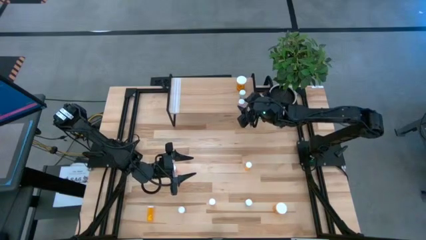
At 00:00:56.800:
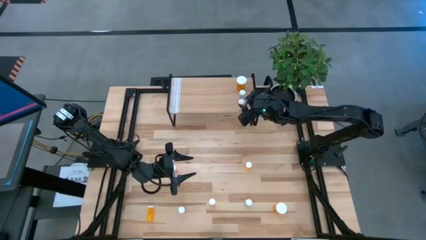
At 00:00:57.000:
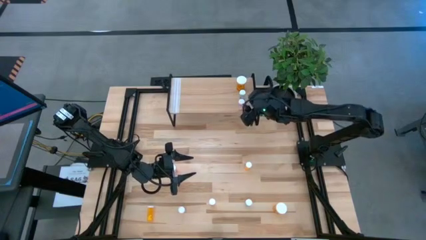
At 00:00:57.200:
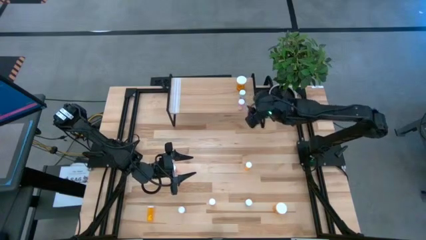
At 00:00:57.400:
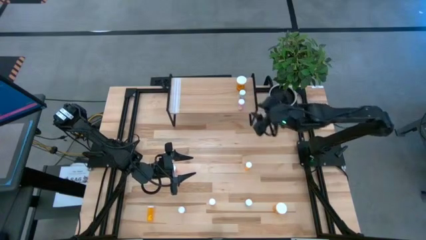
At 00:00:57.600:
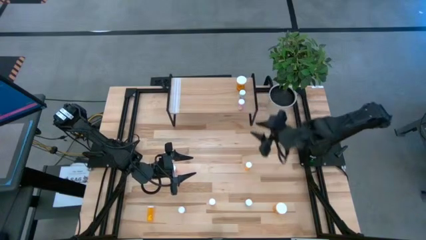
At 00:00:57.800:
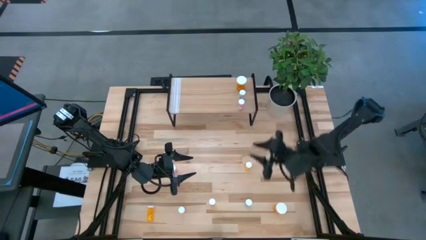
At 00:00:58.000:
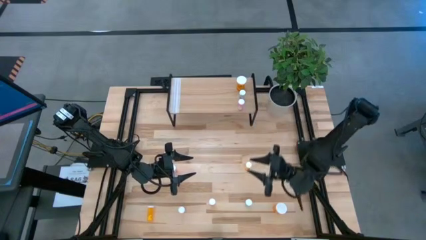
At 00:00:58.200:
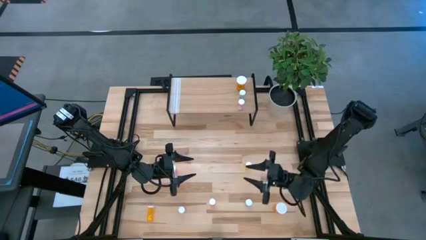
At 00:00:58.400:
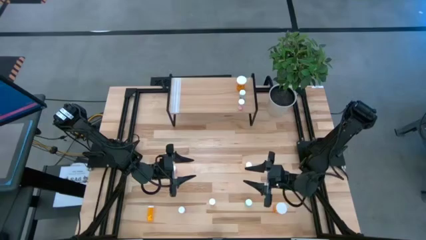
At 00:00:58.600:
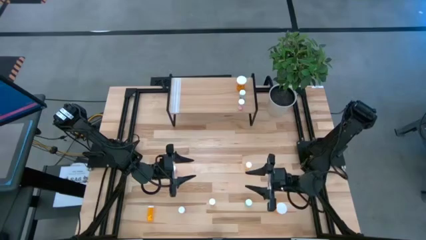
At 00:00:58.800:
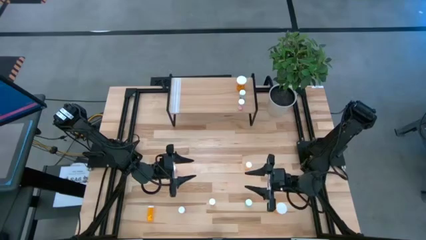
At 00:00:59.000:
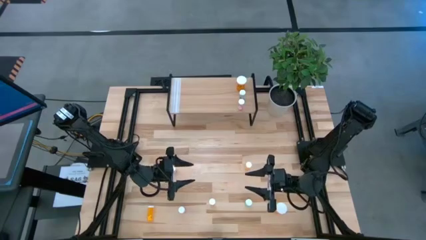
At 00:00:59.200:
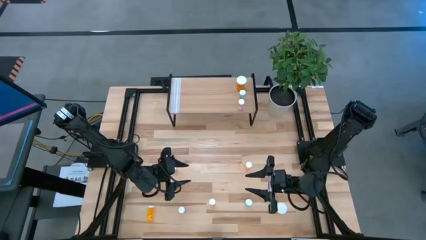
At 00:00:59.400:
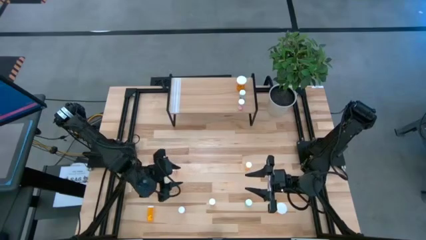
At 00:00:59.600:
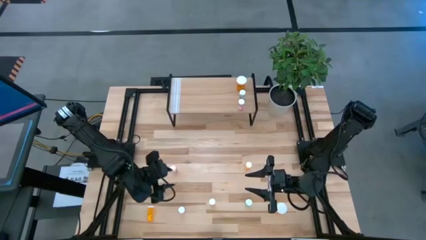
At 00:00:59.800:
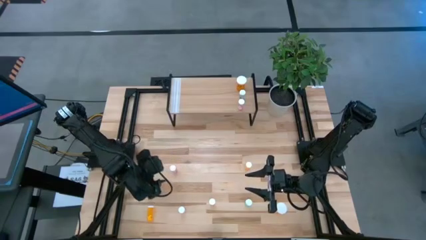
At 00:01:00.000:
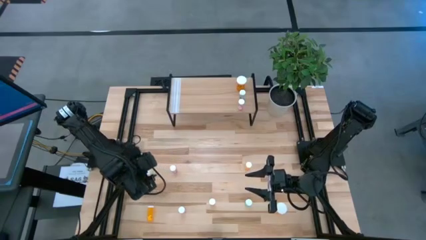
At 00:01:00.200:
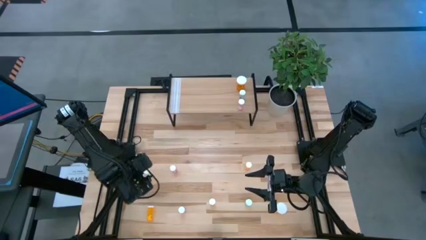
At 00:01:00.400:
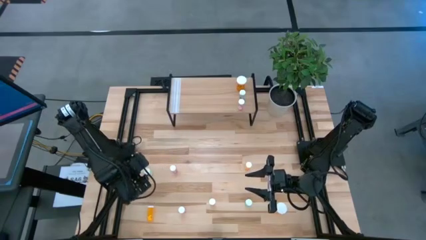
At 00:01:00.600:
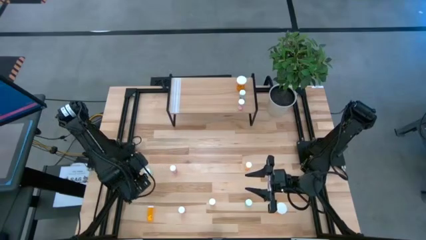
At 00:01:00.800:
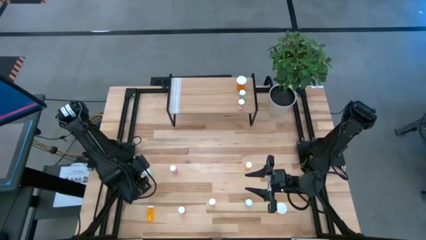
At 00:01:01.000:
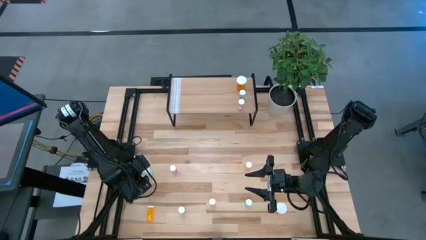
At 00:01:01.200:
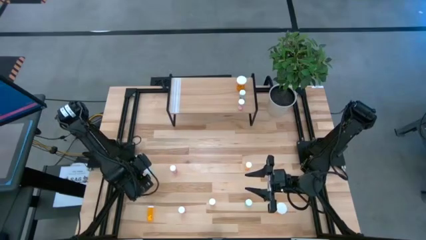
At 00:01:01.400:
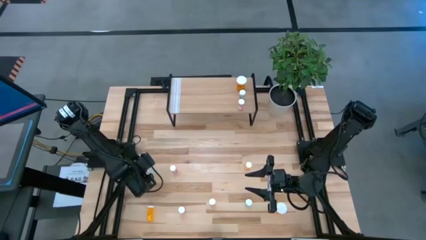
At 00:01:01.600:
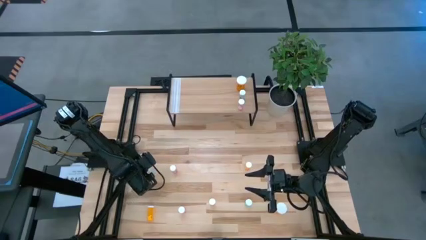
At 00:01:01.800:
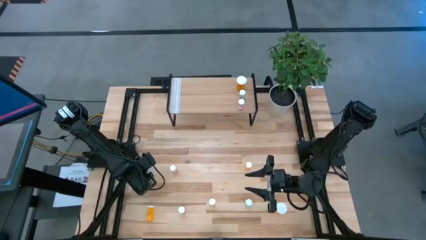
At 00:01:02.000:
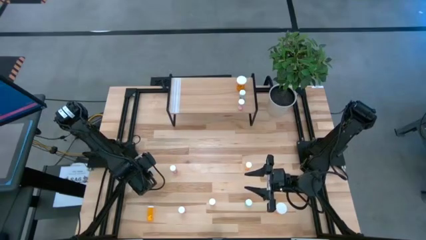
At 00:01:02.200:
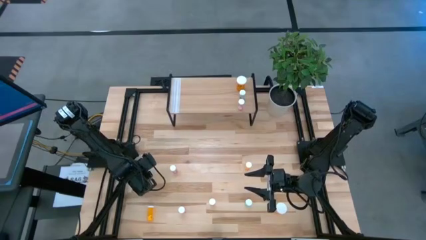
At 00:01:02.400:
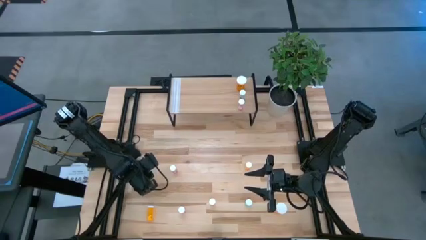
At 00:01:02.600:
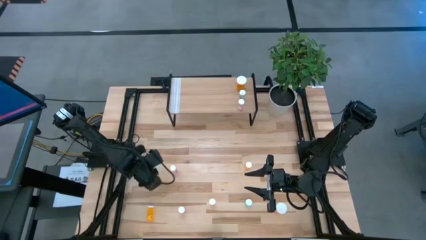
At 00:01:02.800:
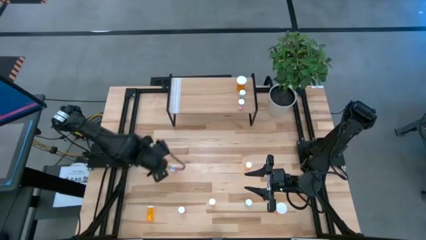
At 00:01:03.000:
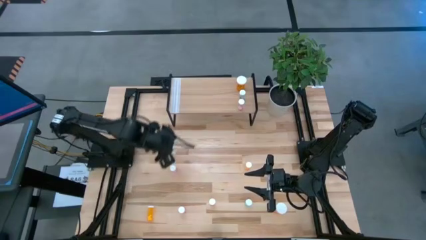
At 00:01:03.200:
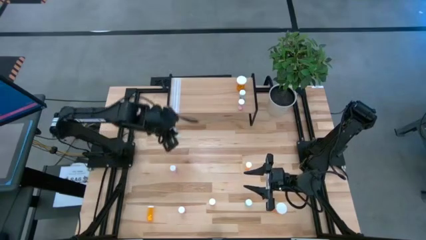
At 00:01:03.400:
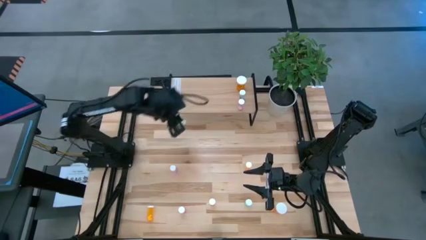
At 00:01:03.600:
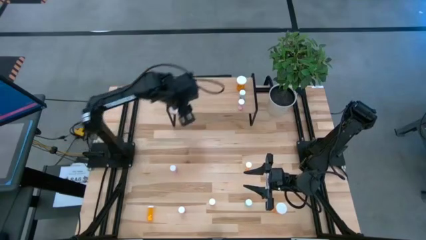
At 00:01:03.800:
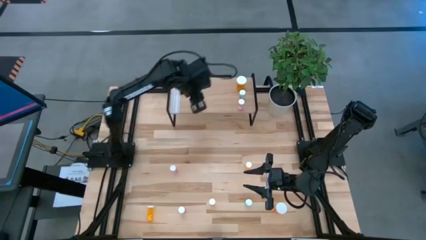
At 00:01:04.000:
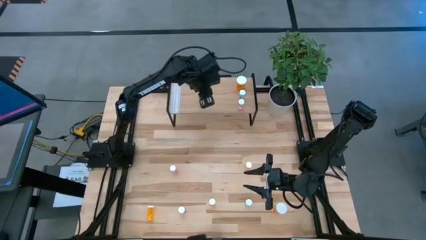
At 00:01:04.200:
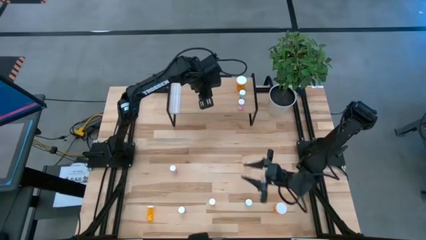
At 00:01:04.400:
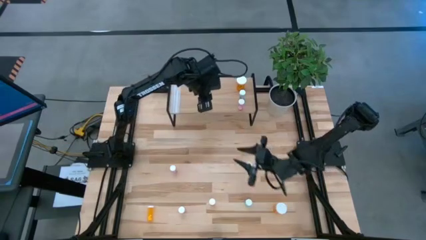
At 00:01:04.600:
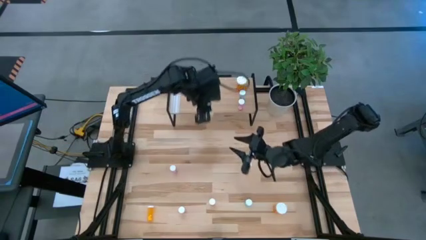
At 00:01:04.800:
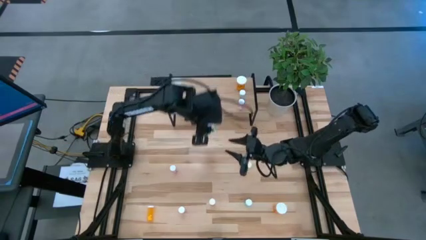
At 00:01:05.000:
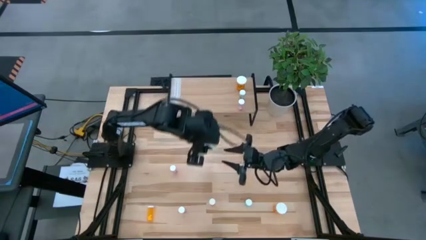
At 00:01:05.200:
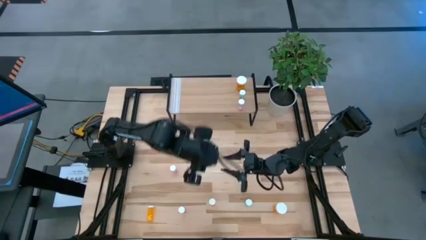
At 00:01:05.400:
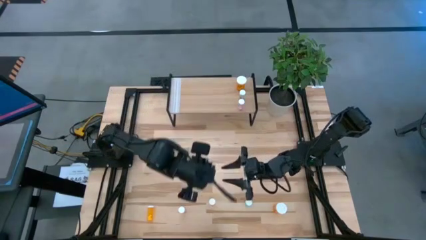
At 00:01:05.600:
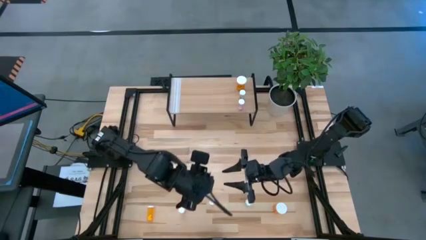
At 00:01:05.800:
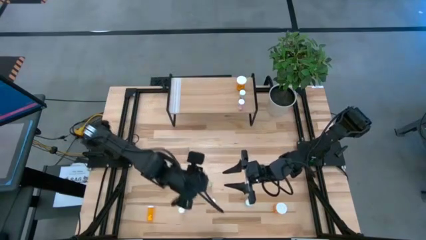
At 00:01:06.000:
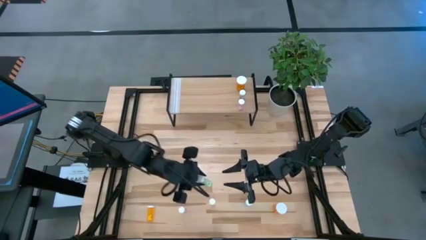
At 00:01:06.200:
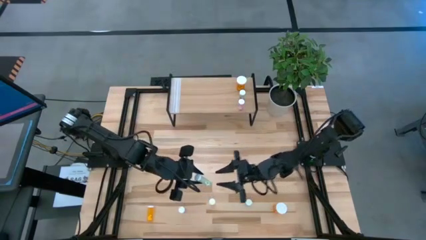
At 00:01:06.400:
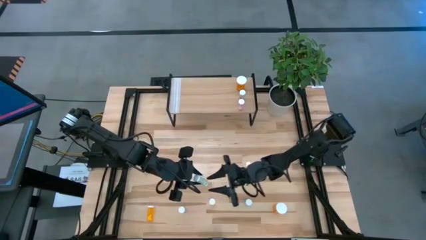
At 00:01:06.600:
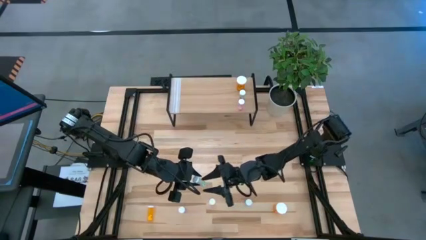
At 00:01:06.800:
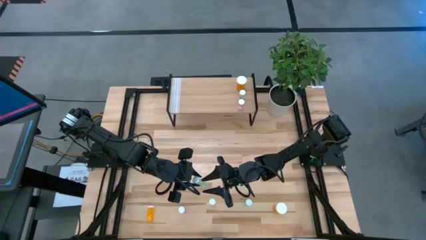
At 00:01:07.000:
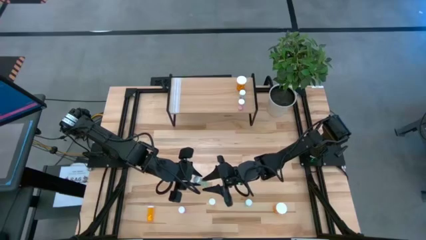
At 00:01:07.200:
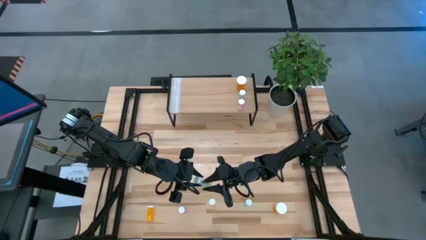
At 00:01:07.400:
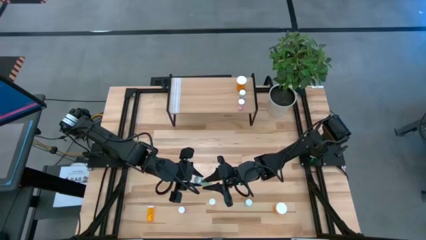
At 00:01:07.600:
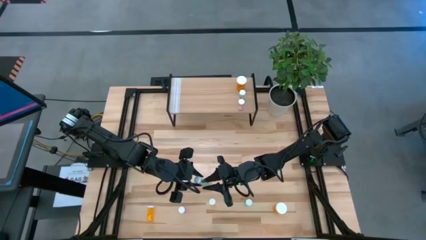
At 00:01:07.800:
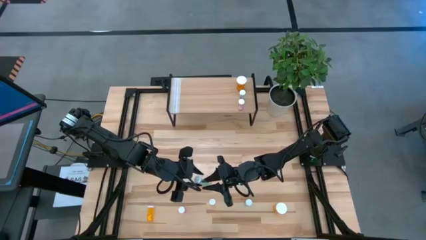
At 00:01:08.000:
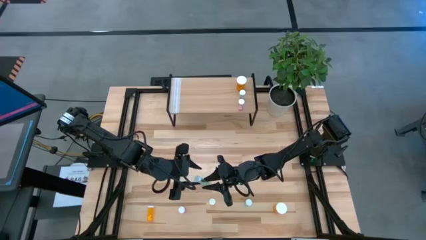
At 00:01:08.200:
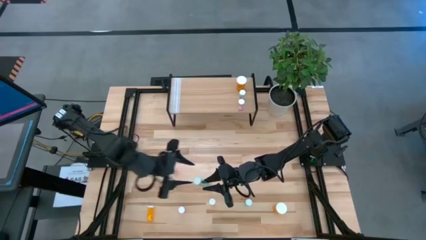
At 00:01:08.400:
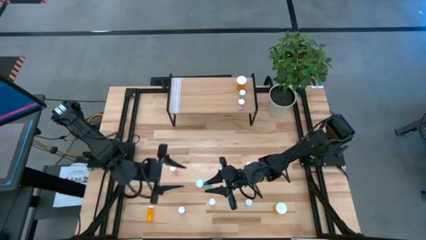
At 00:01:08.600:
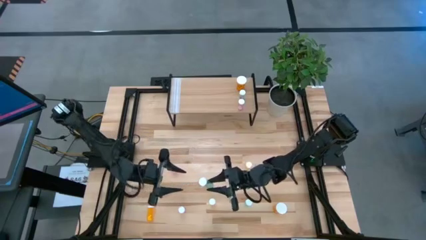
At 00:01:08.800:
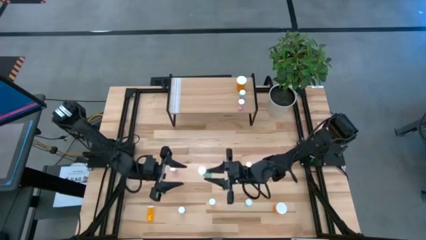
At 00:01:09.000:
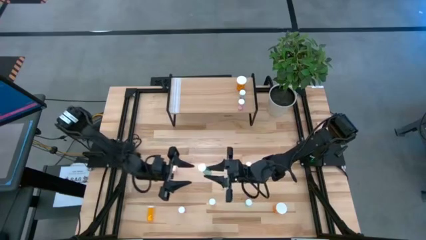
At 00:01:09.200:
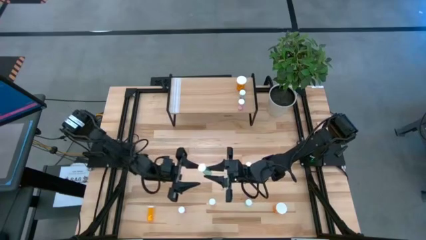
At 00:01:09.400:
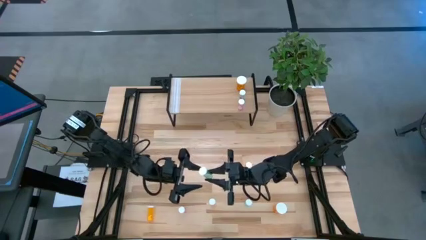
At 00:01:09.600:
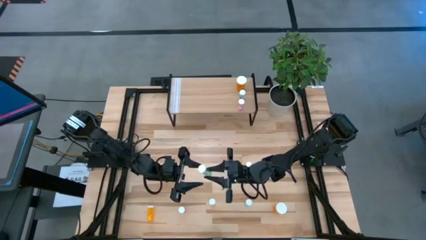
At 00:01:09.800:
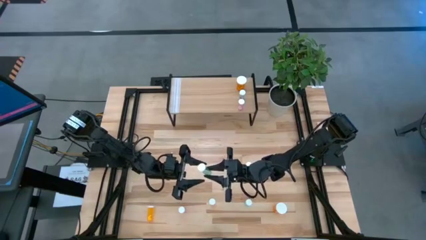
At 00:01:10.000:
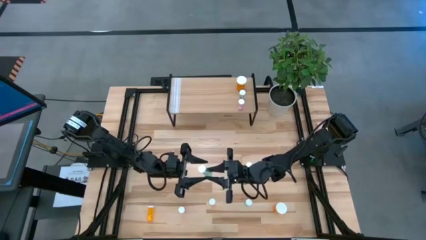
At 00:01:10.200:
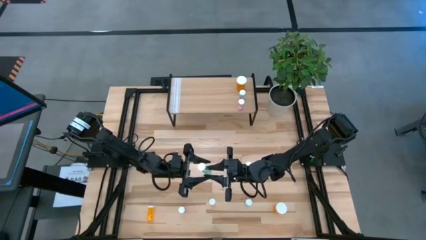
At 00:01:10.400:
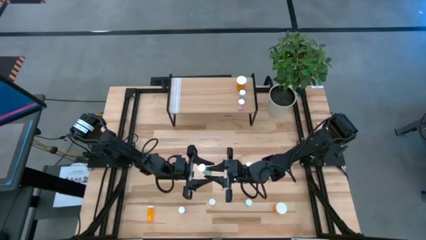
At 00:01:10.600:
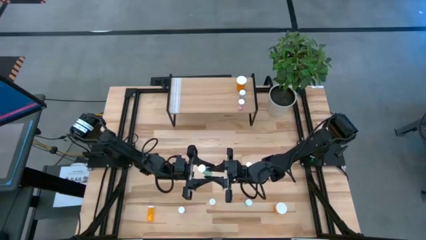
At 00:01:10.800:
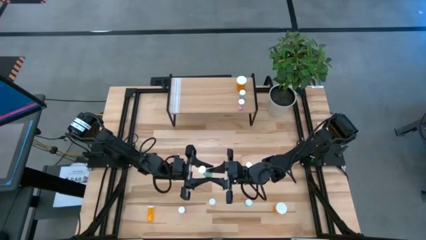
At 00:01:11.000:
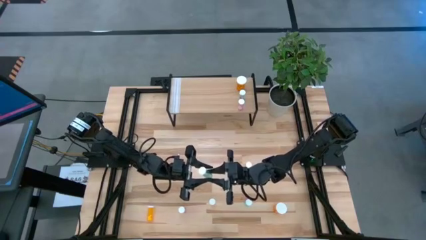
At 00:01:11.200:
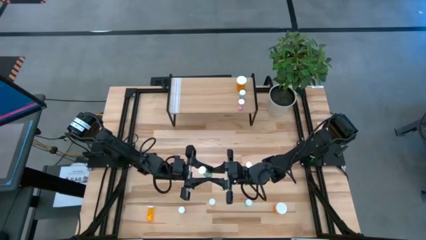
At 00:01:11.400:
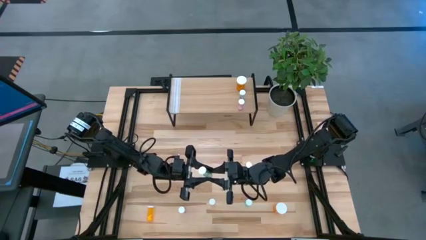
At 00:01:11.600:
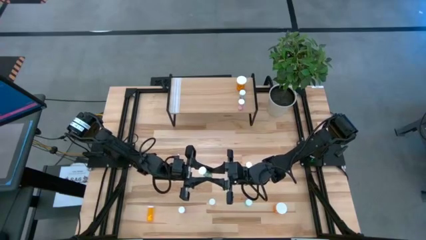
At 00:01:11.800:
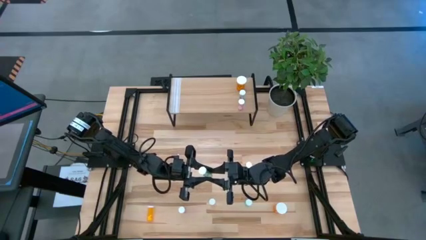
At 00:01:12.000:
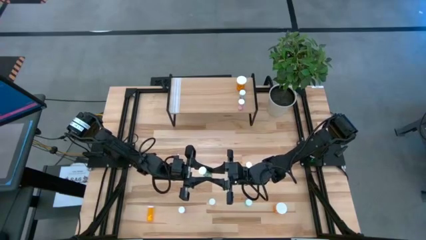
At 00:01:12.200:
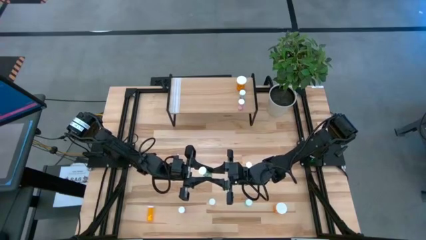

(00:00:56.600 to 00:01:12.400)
Task: Pick and place medicine bottles onto shelf by color
Put the top small blue pill bottle on the shelf
